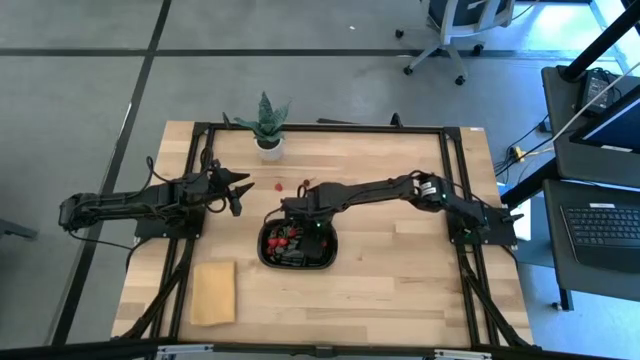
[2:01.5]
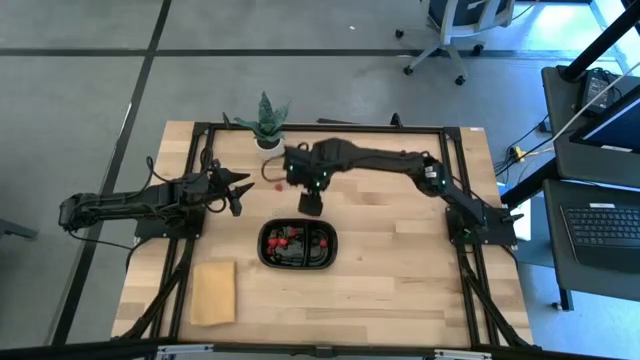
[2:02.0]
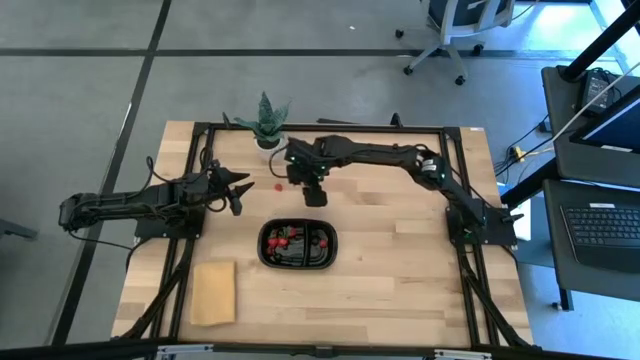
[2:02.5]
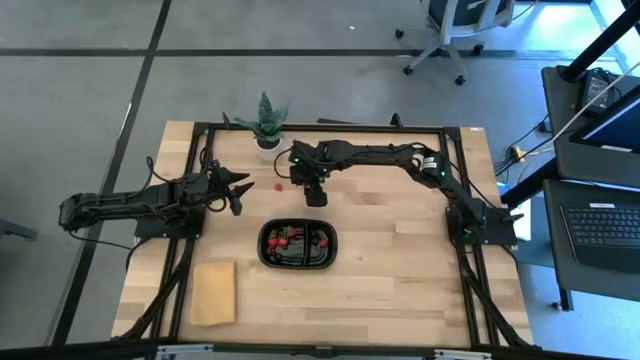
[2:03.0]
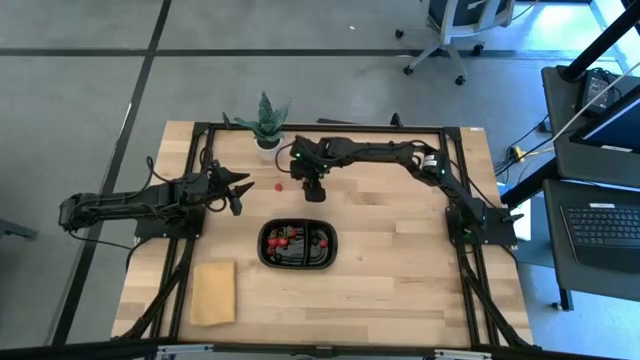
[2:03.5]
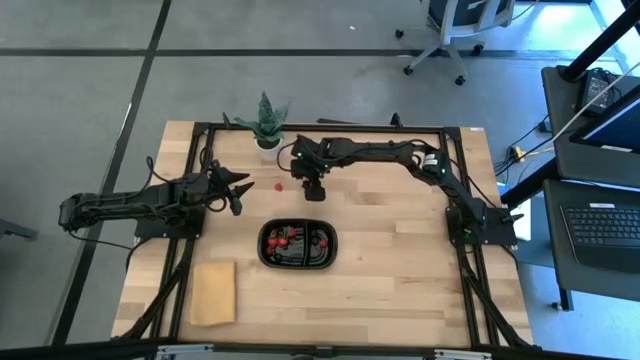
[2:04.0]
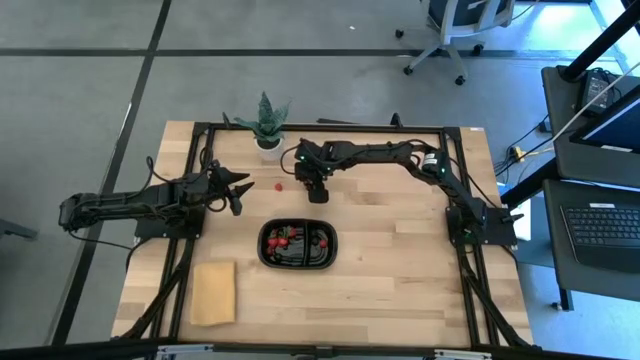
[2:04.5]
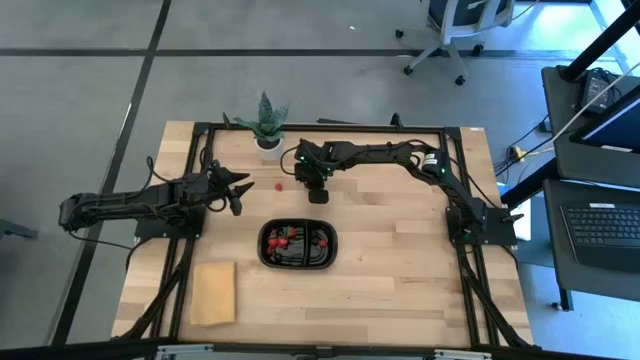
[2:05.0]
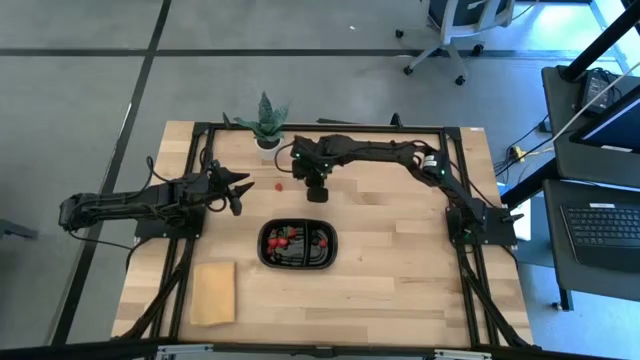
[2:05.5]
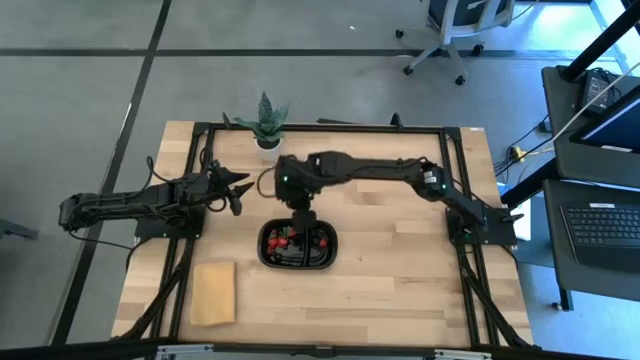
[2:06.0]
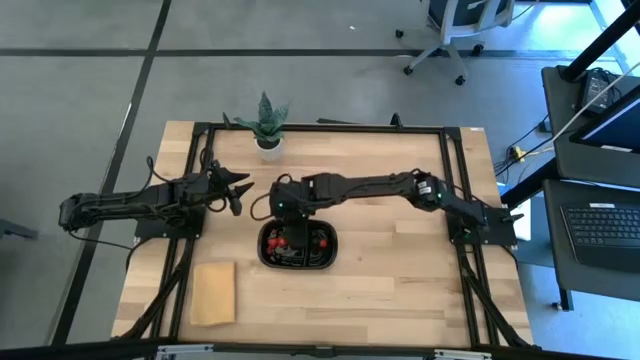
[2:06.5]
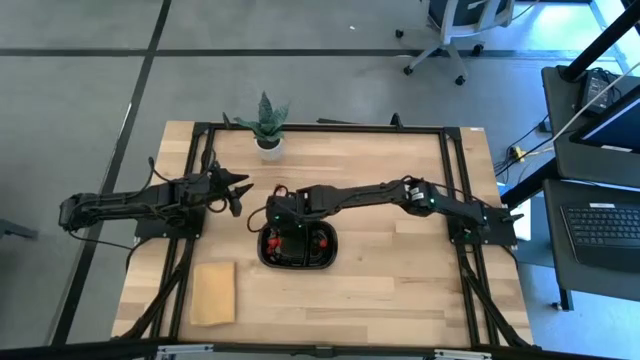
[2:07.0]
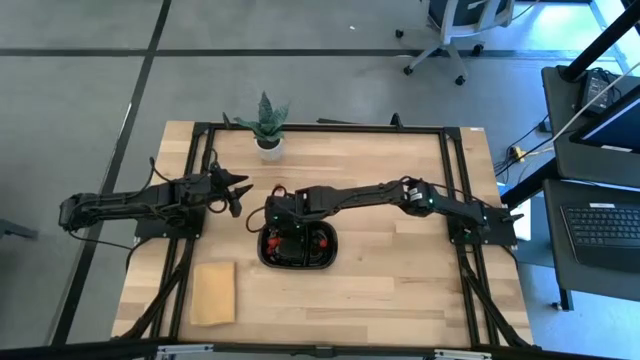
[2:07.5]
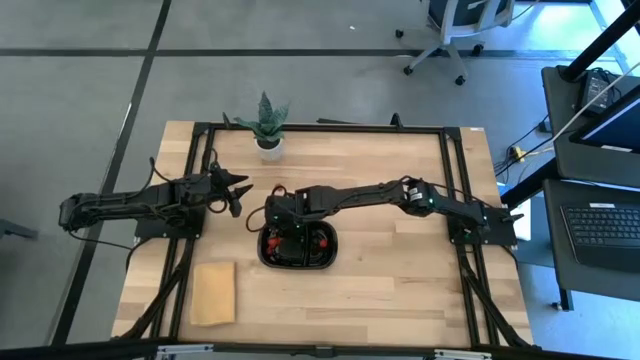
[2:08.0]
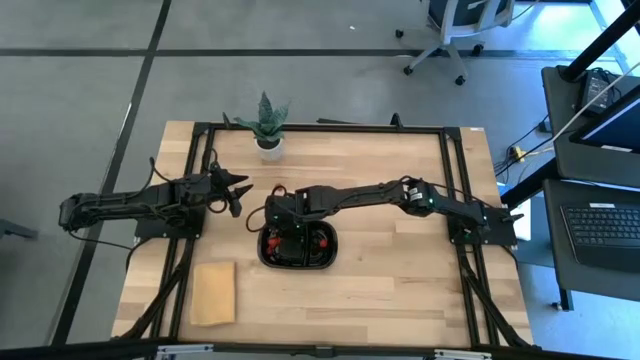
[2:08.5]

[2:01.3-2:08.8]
Task: Pick and placing Produce into tupperware
Put the red cherry into the black bin

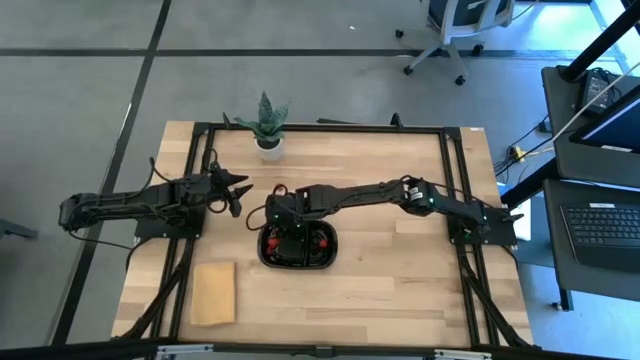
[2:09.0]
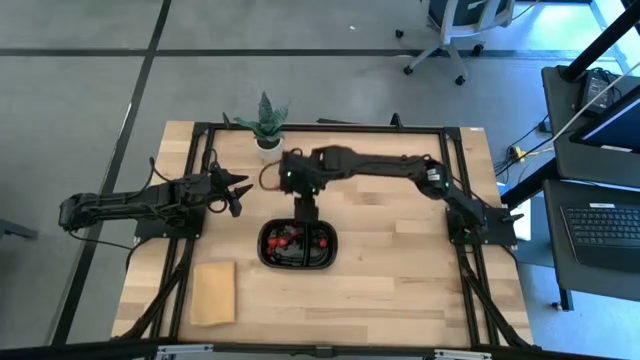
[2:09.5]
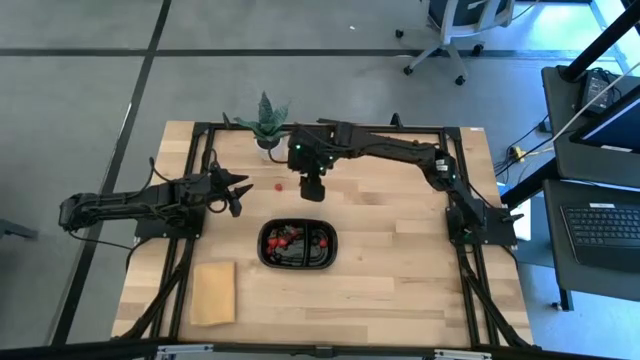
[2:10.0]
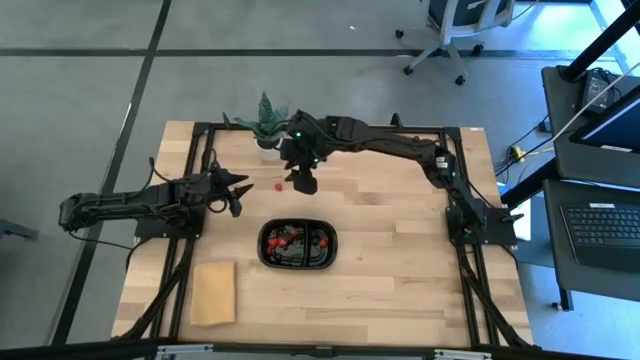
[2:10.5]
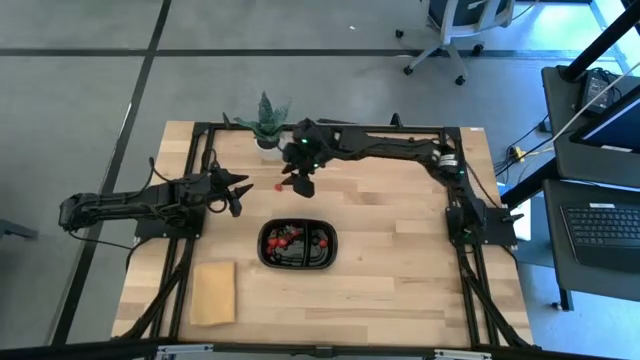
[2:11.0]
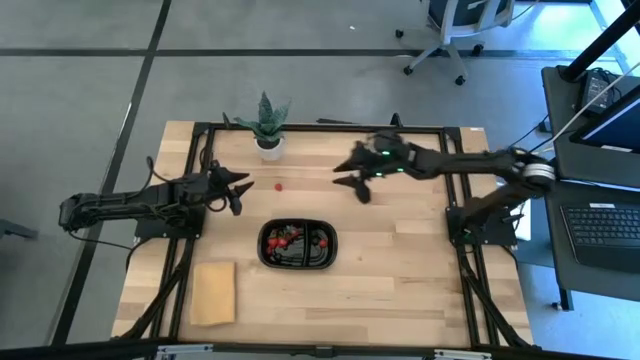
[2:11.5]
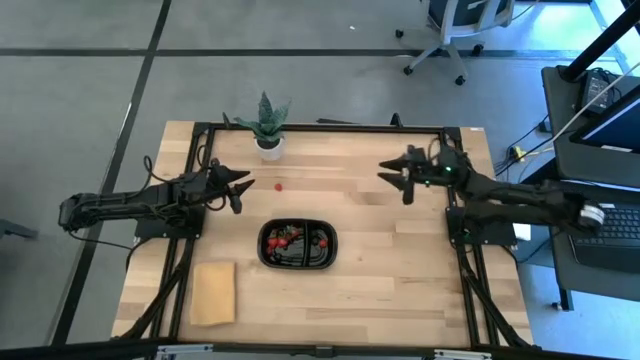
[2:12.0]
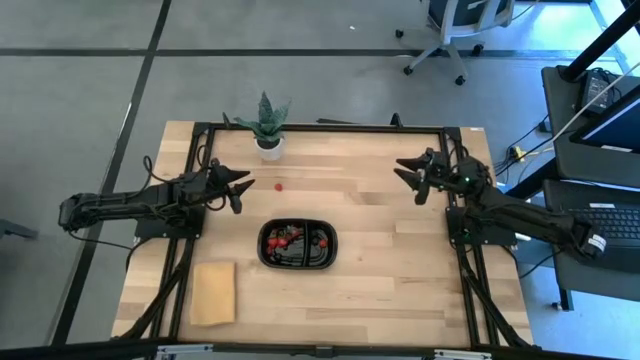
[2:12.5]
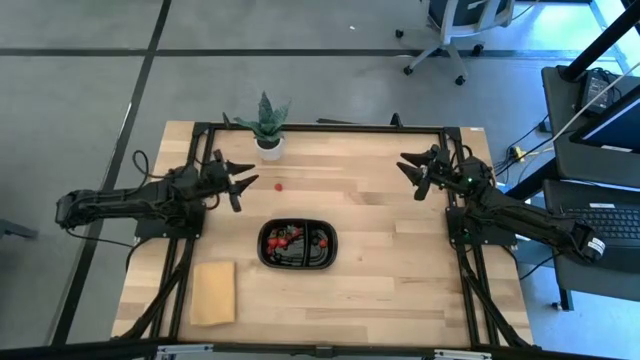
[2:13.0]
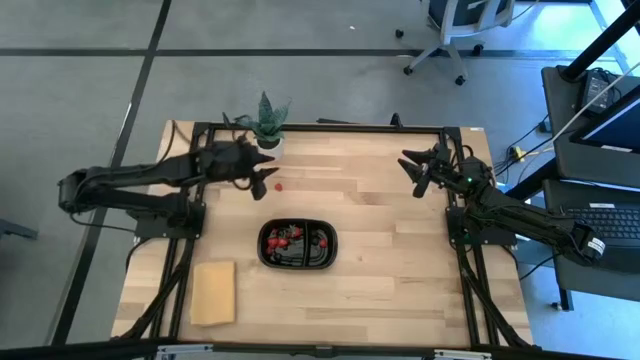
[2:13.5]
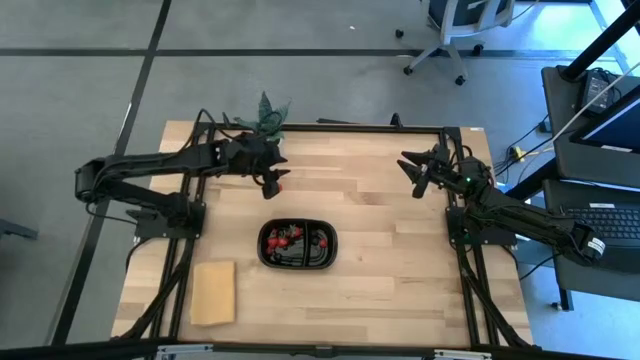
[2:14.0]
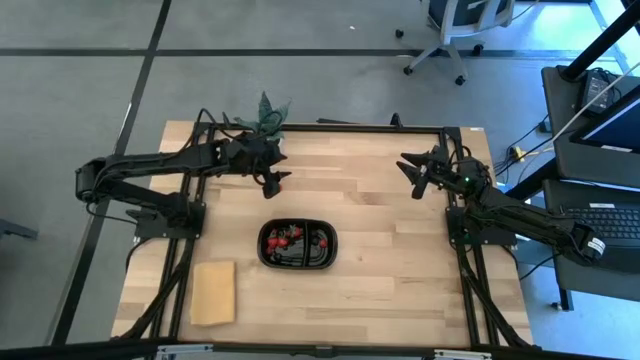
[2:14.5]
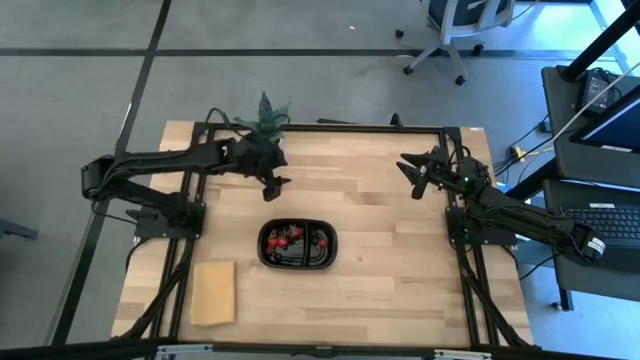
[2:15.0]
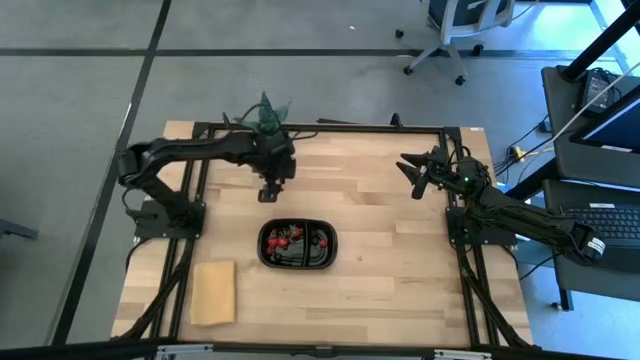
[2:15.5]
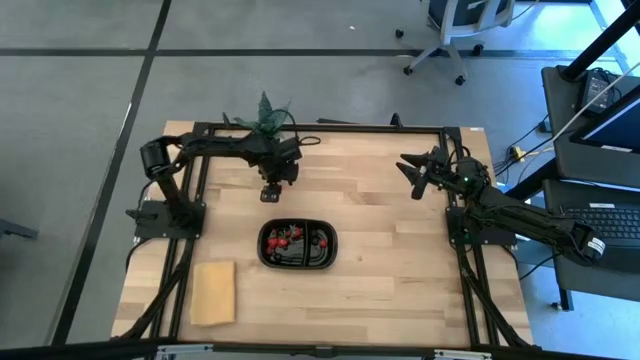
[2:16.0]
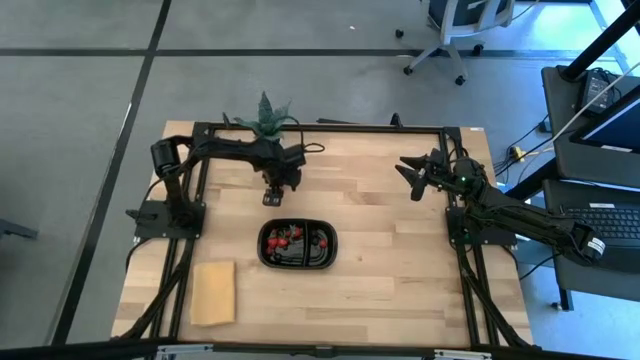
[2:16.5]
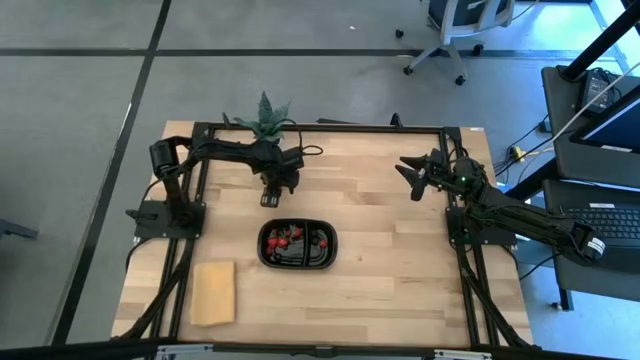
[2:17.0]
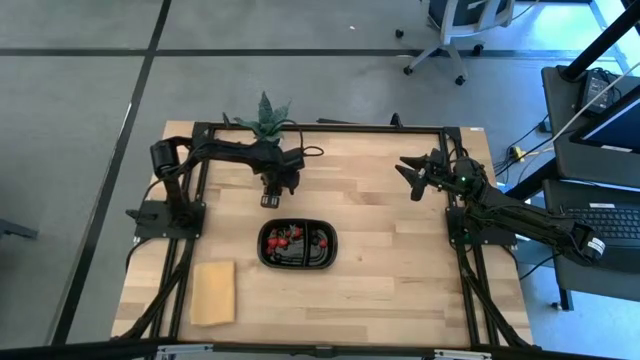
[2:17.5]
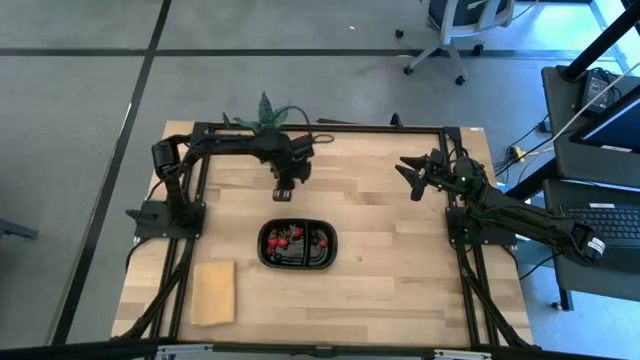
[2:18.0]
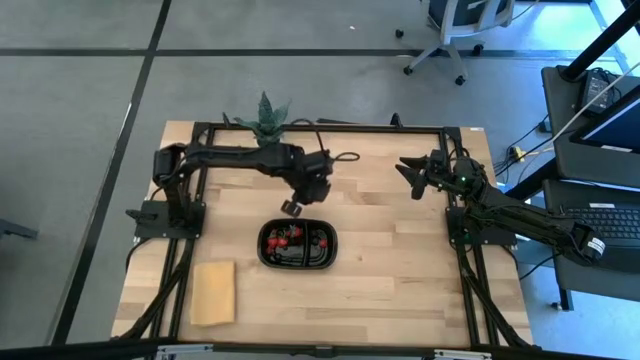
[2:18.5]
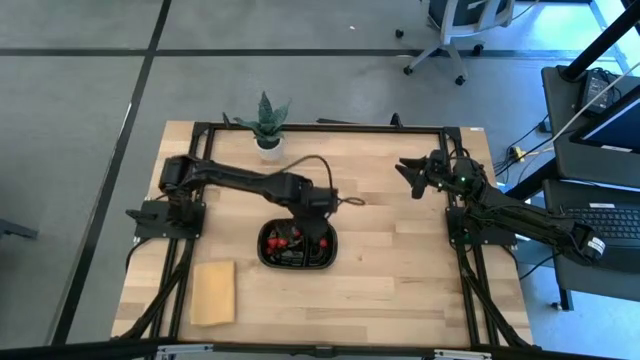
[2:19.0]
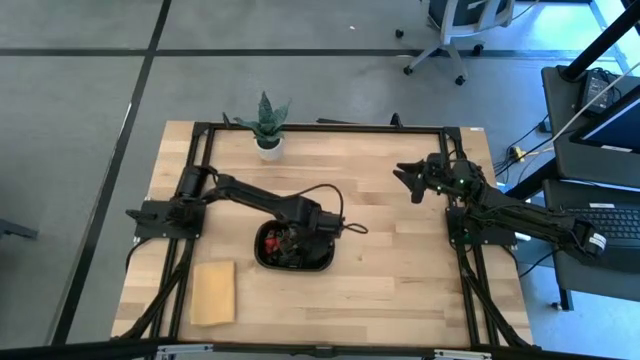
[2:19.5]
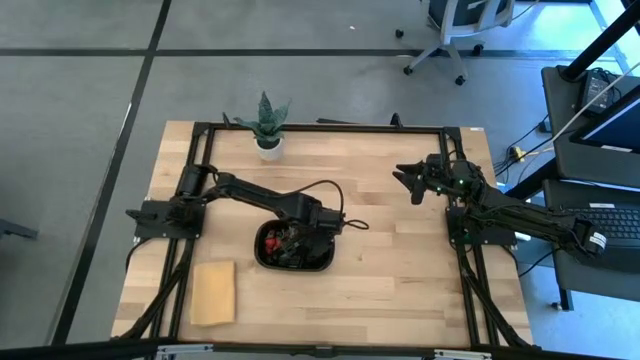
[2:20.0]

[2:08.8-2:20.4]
Put the red raspberry into the black bin

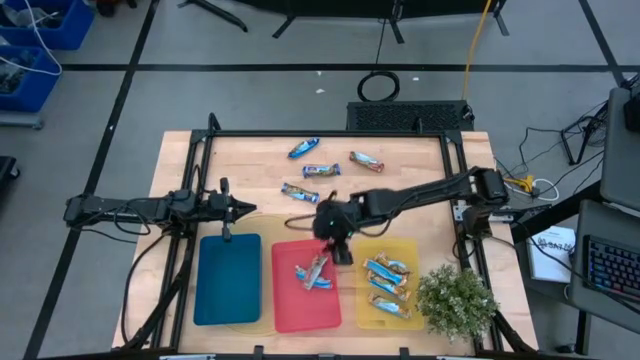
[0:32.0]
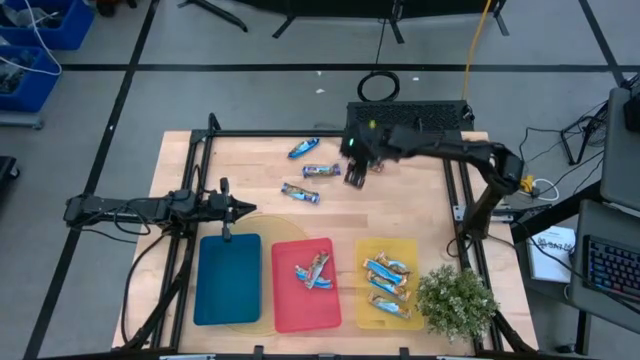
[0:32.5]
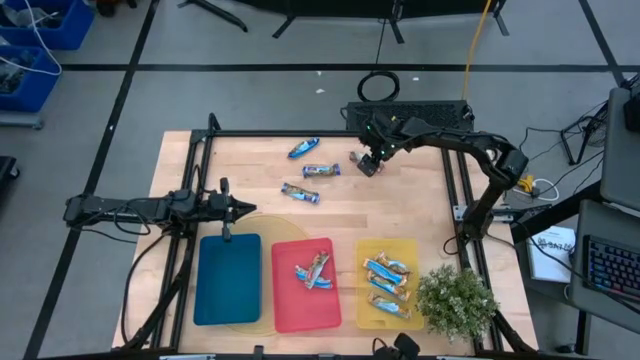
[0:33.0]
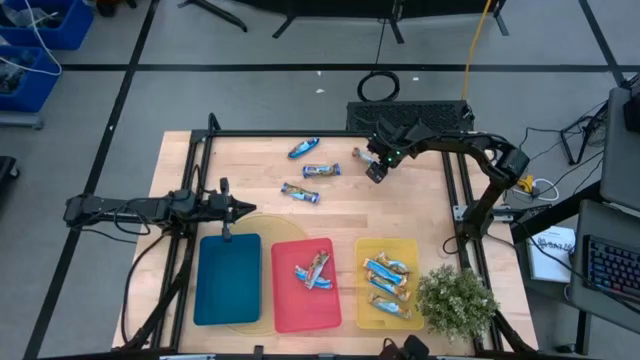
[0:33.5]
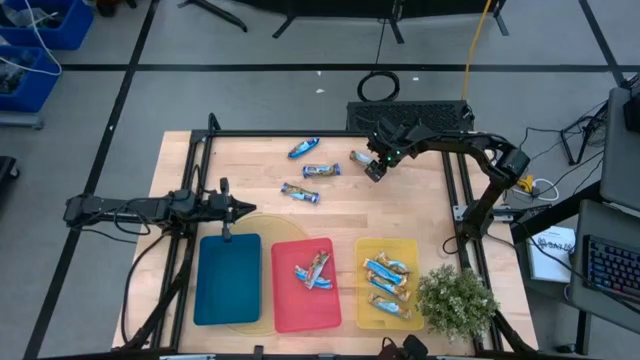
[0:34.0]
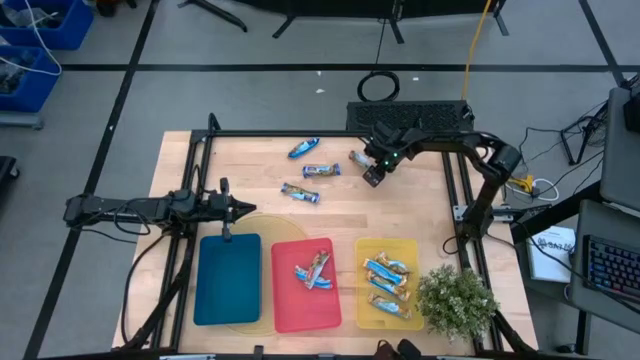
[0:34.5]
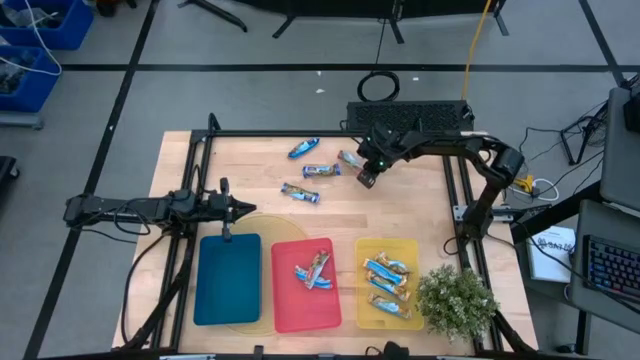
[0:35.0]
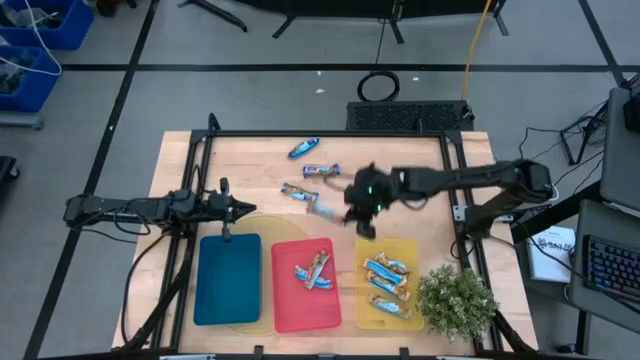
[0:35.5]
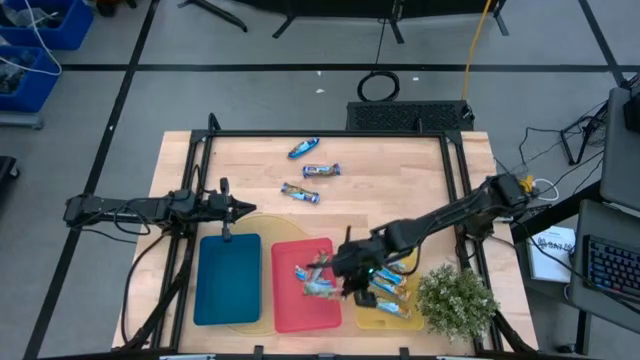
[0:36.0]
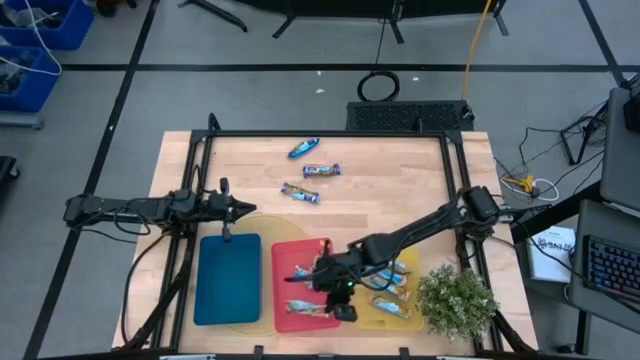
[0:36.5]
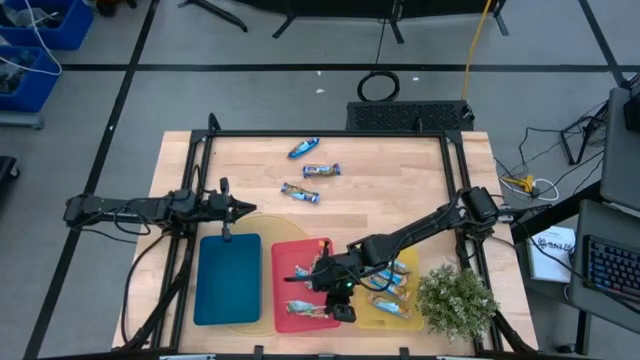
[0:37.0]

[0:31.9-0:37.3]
Task: Pick and place Granola Bars by type
Put the green granola bar into the pink bin
